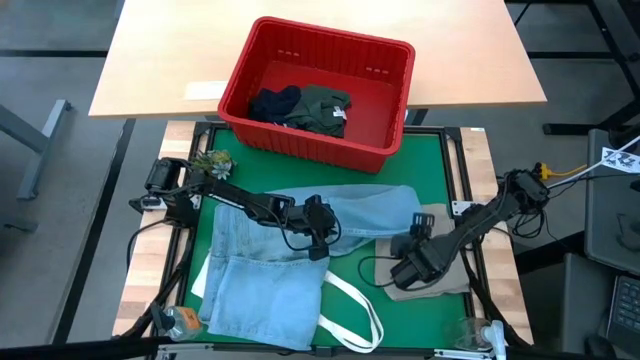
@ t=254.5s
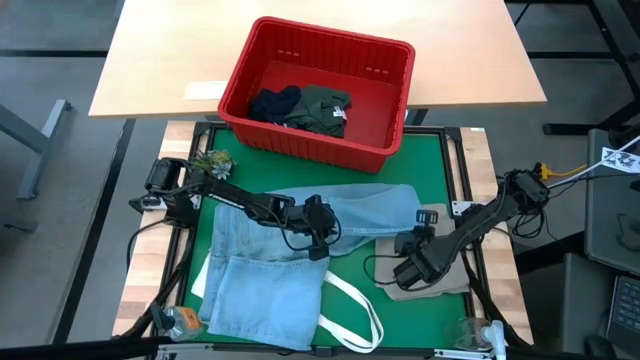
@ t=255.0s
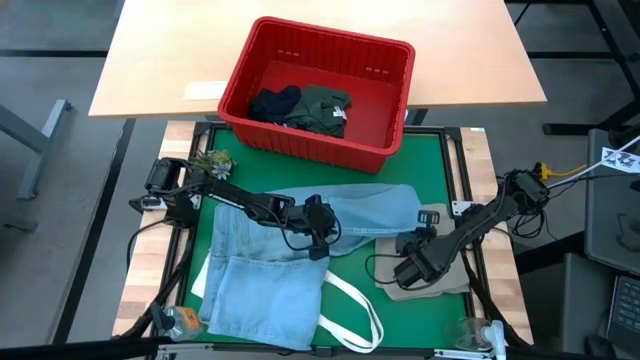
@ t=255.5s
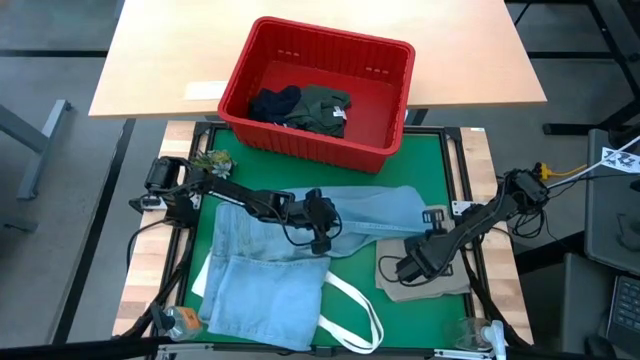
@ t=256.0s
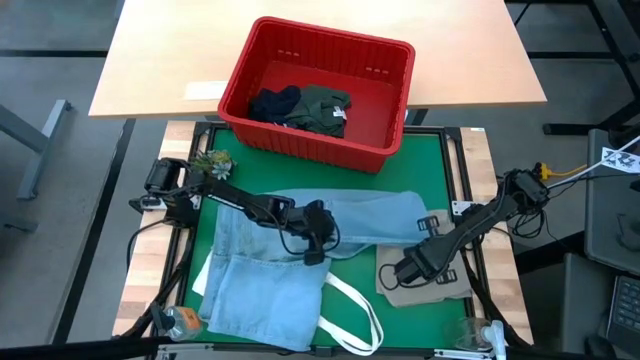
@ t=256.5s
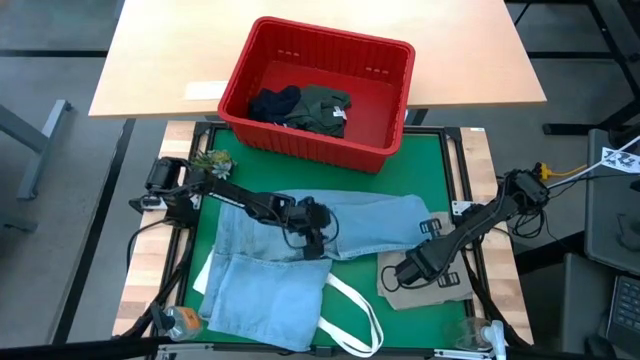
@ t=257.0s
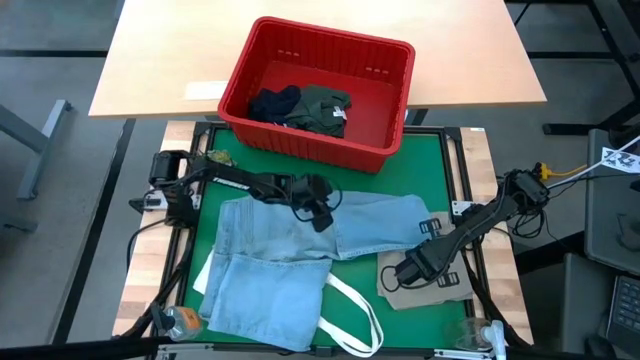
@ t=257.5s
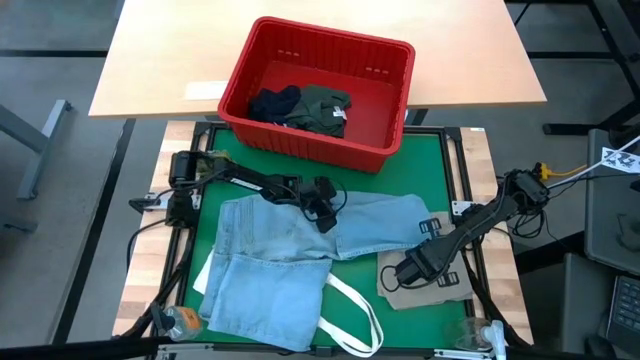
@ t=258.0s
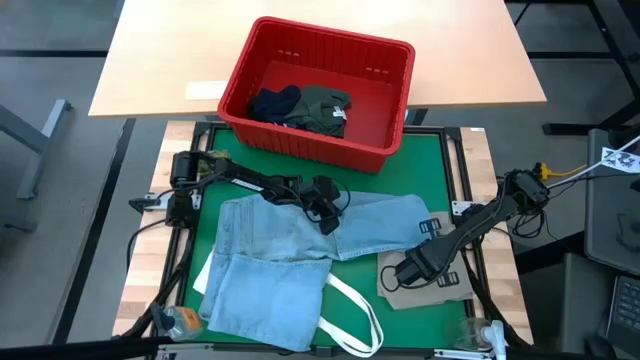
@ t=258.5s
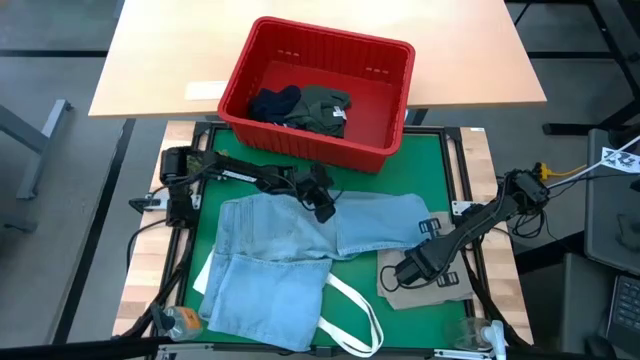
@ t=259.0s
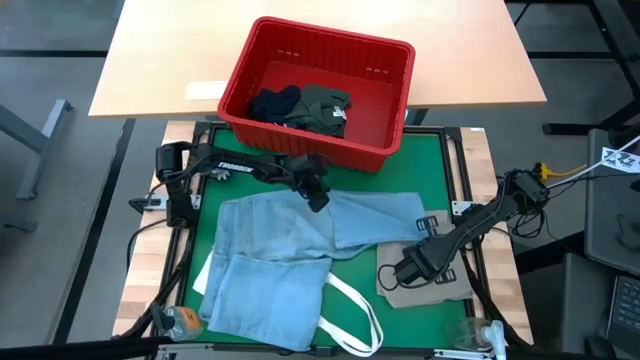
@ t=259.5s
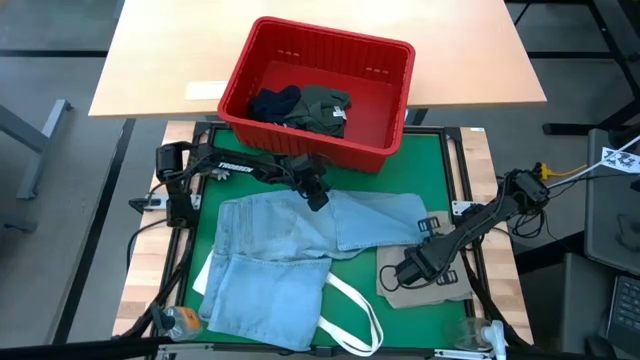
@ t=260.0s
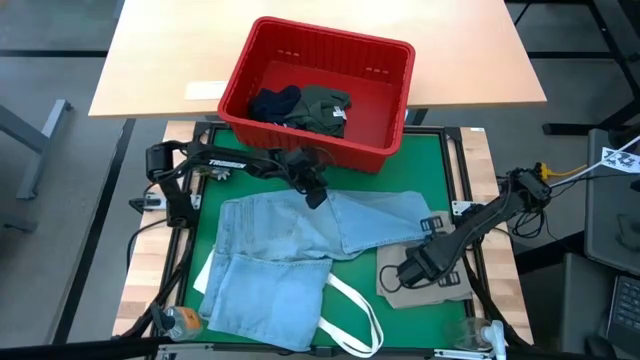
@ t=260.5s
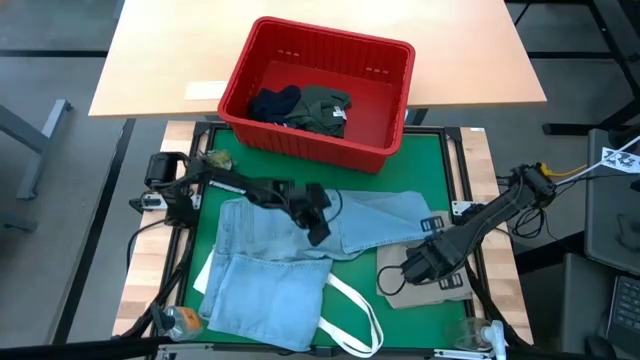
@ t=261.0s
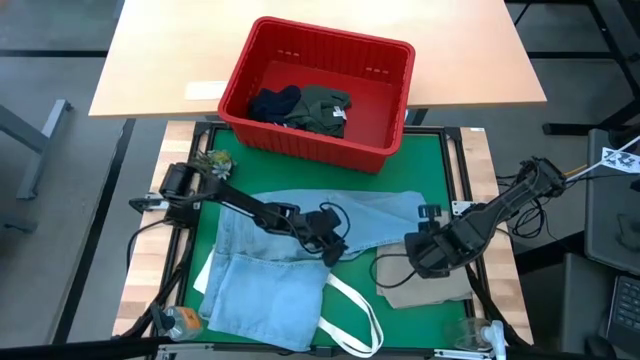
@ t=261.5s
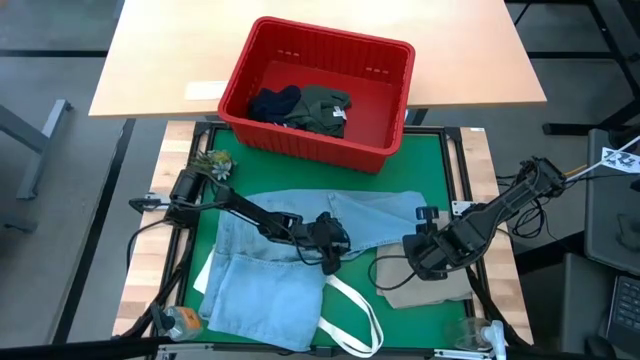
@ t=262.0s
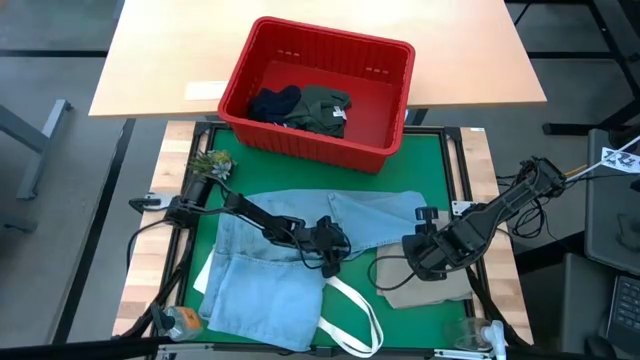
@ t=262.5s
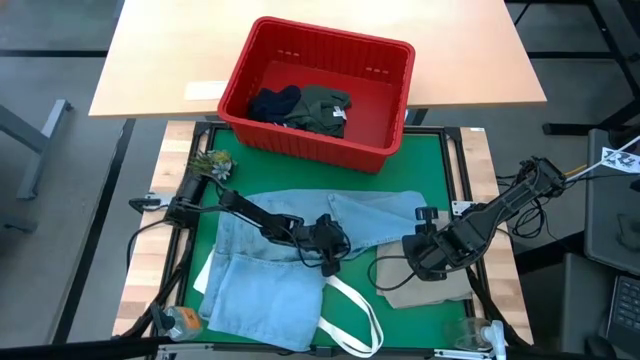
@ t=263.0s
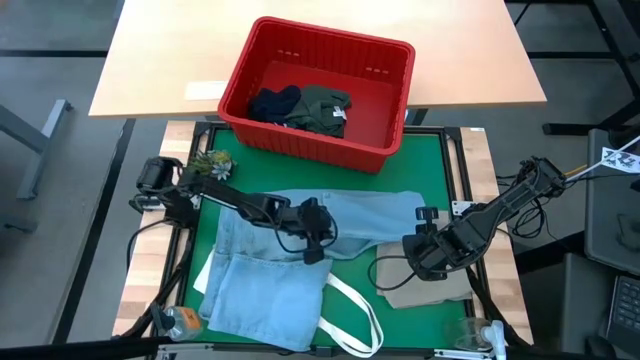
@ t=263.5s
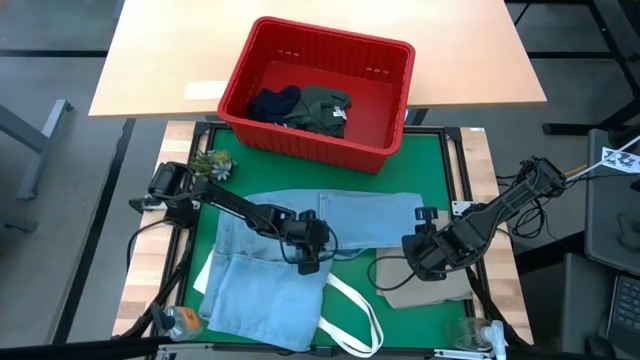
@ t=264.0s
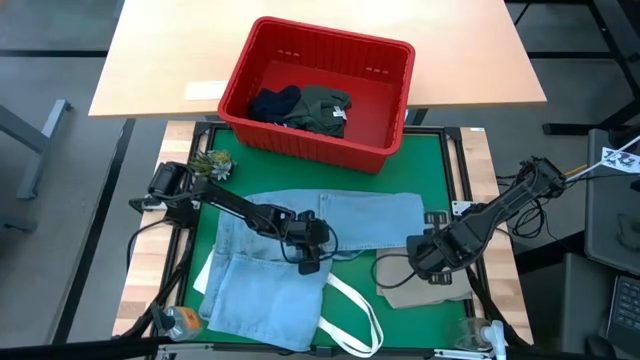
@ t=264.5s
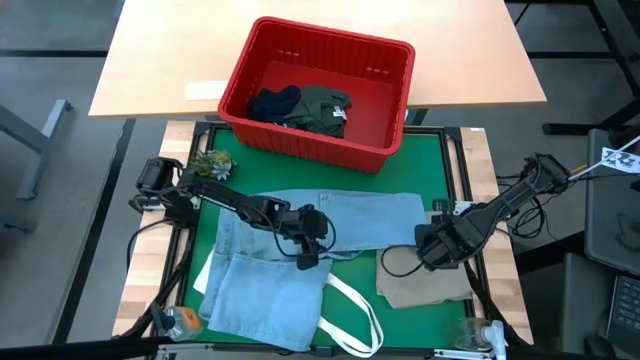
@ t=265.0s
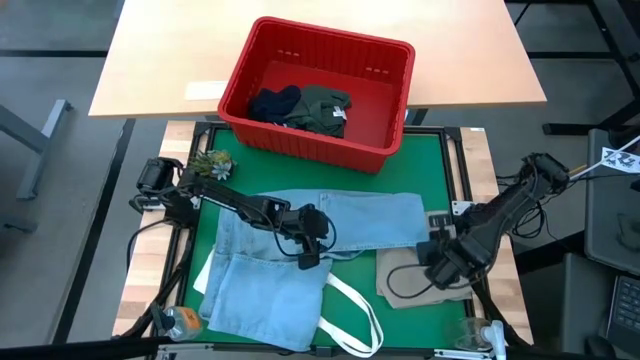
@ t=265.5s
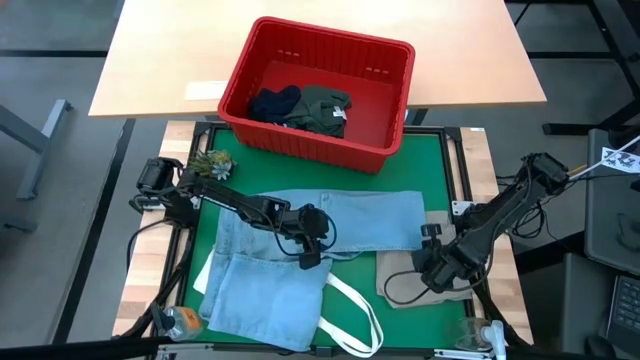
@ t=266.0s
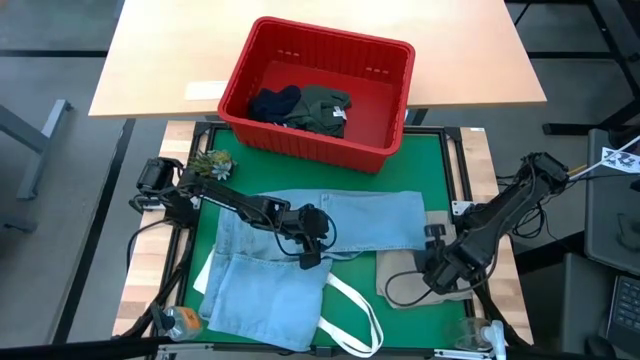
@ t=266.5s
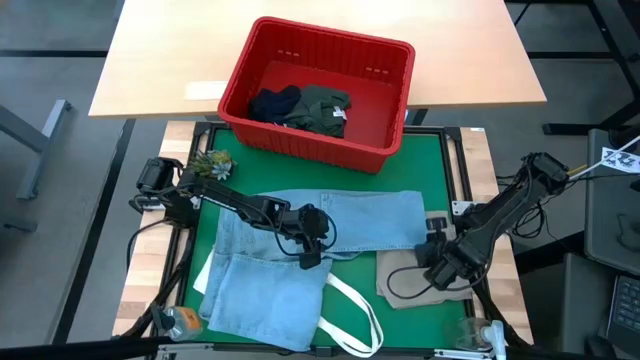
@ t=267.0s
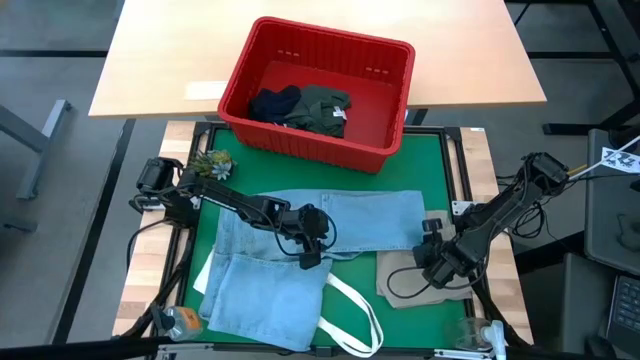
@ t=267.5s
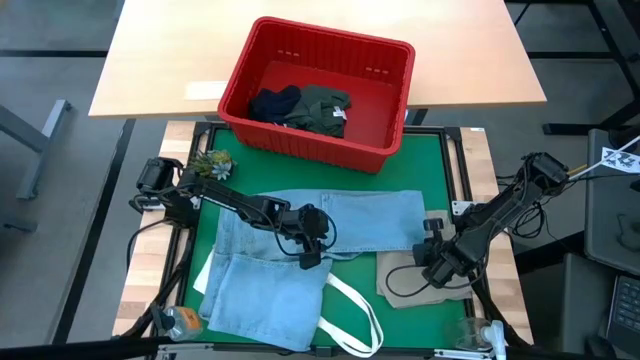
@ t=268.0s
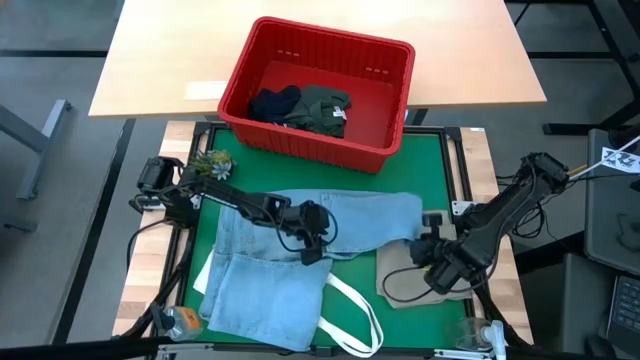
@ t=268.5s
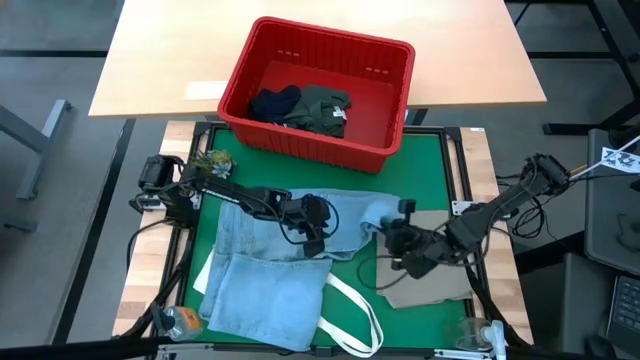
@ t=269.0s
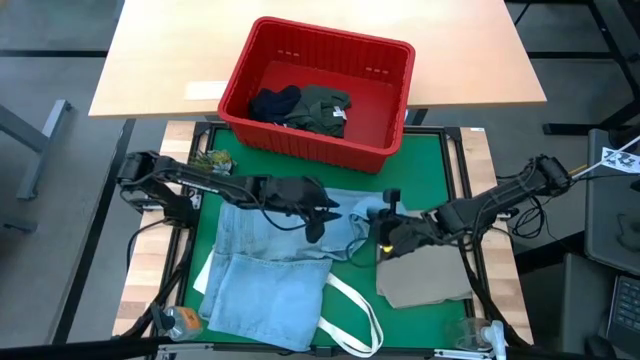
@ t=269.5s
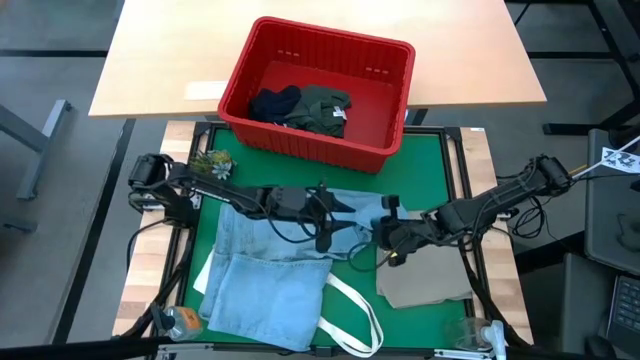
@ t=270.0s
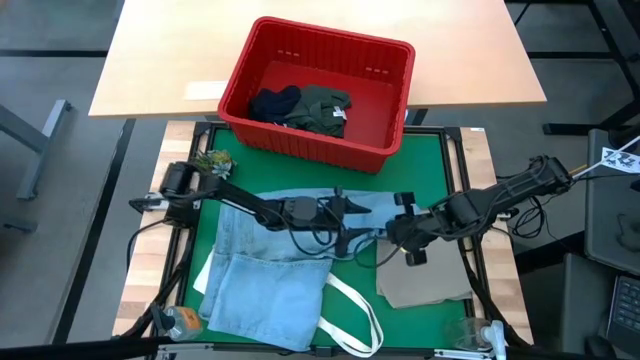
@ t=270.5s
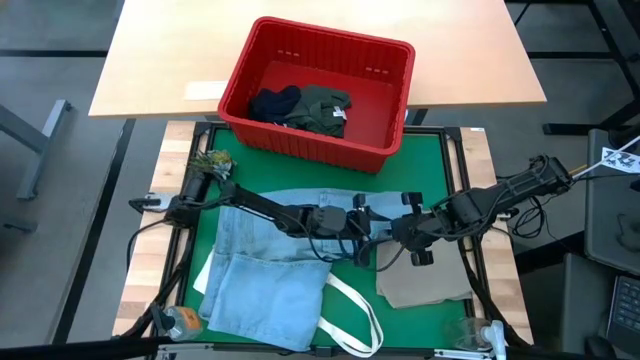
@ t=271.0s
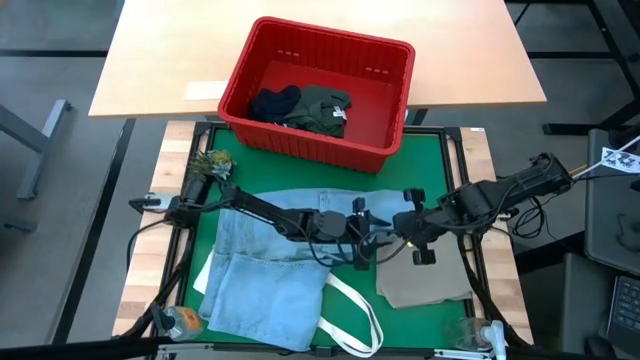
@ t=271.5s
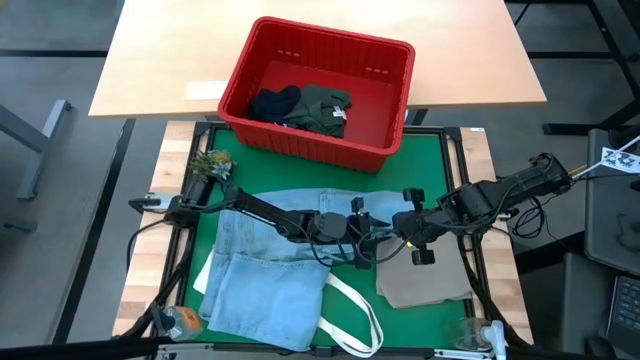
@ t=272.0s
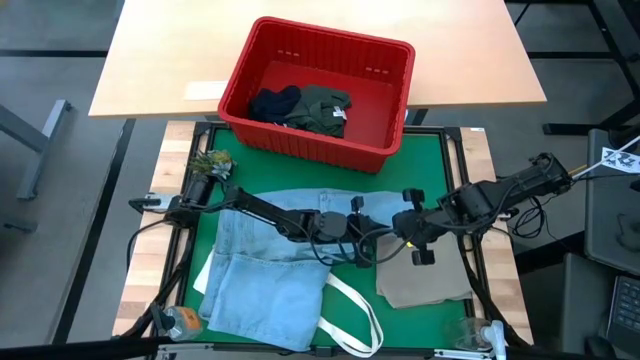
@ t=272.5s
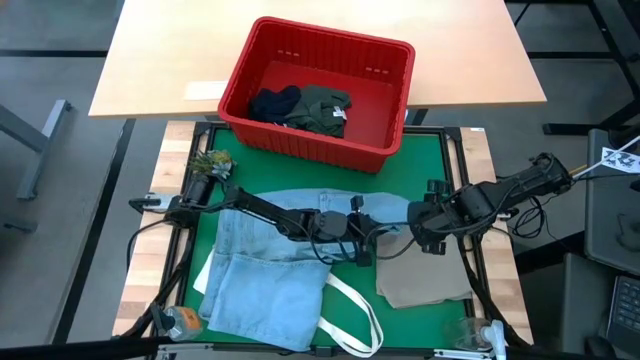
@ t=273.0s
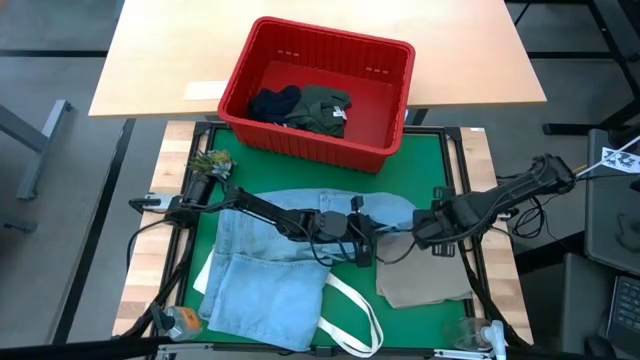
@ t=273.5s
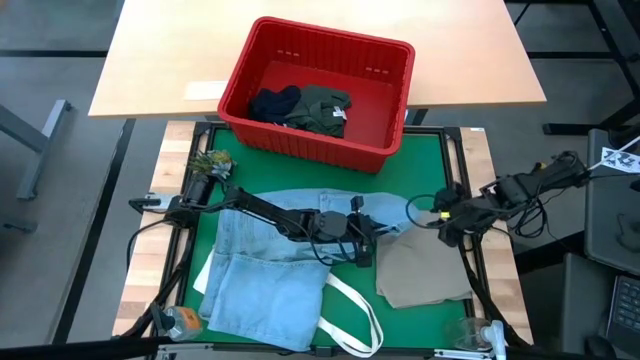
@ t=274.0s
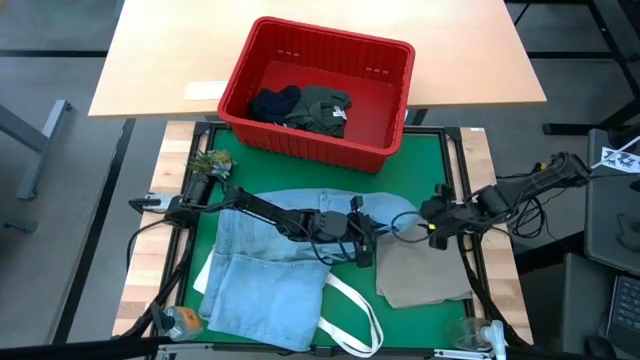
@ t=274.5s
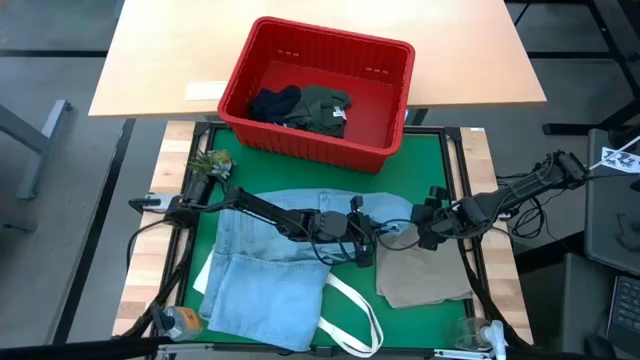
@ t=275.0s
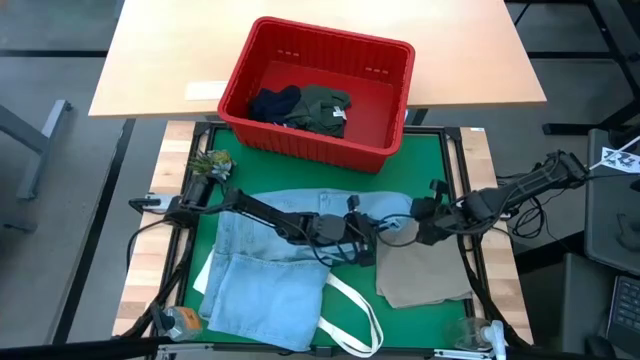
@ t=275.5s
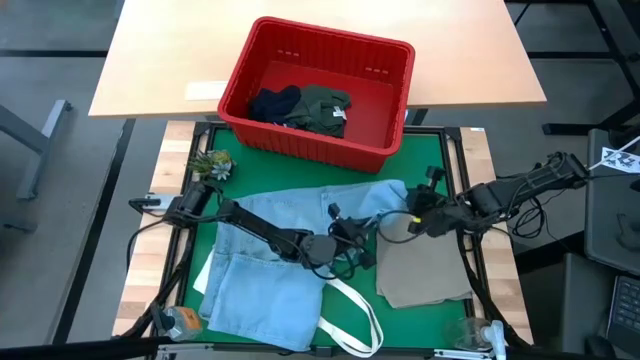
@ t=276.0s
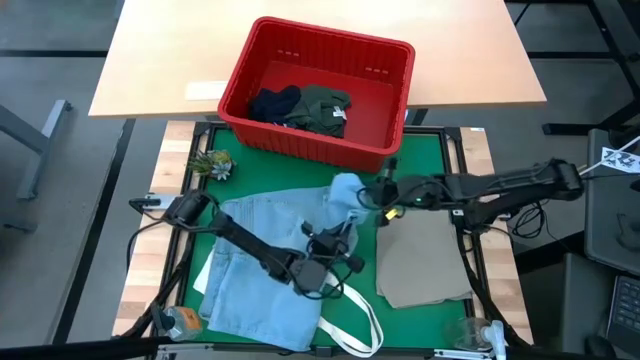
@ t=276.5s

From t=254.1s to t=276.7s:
Task: Fold Laundry from Bin
Fold the light blue pants
